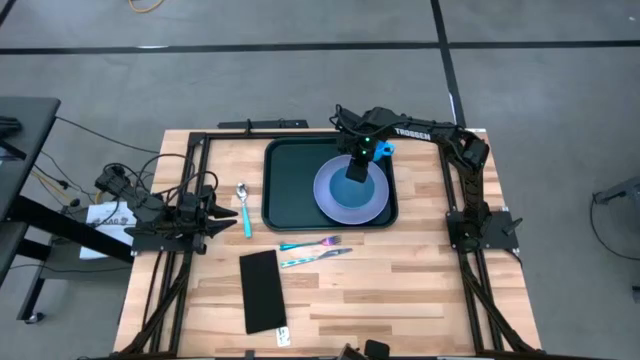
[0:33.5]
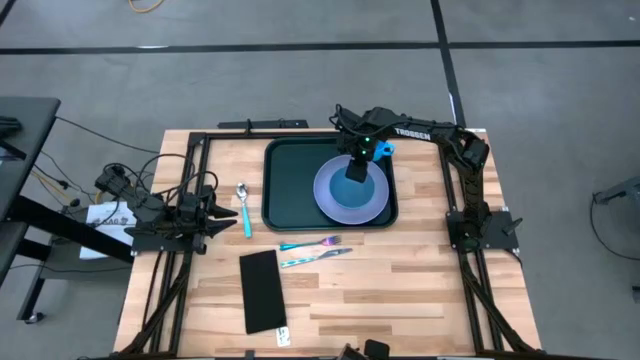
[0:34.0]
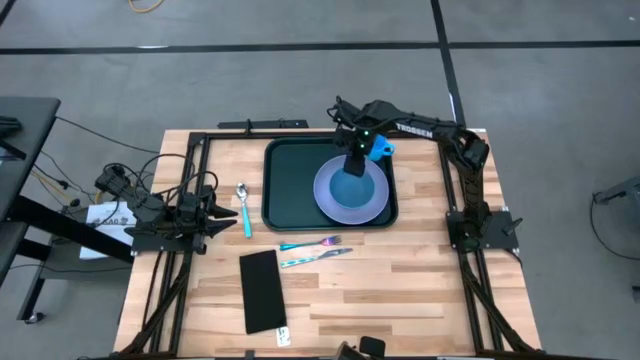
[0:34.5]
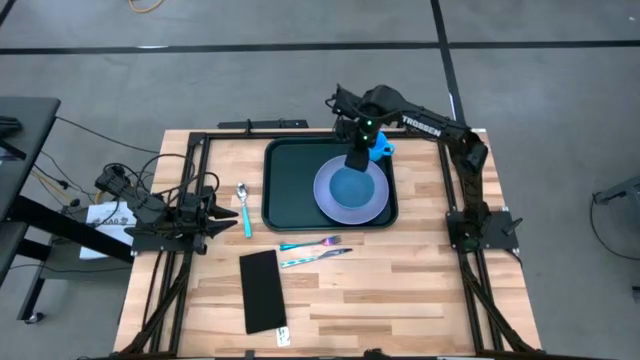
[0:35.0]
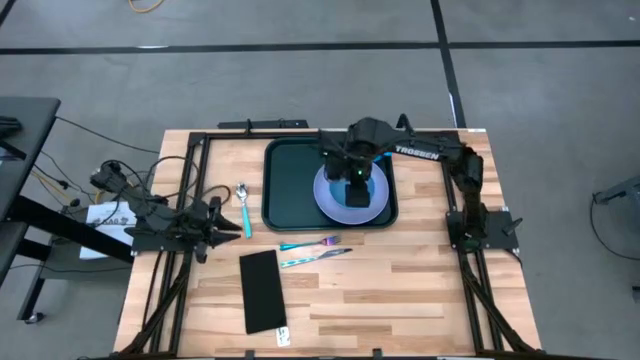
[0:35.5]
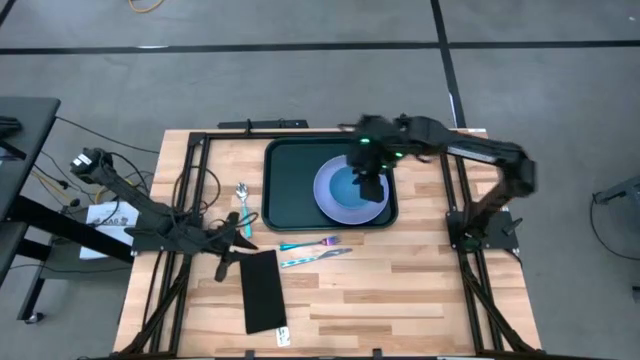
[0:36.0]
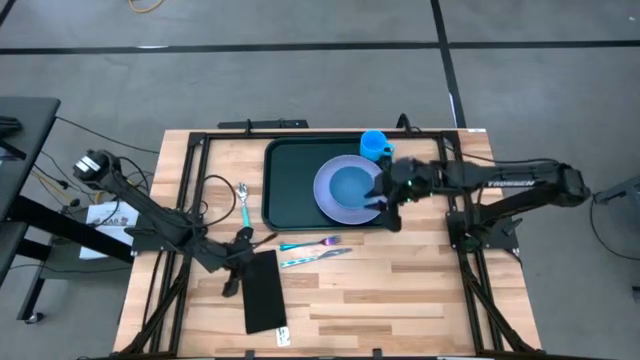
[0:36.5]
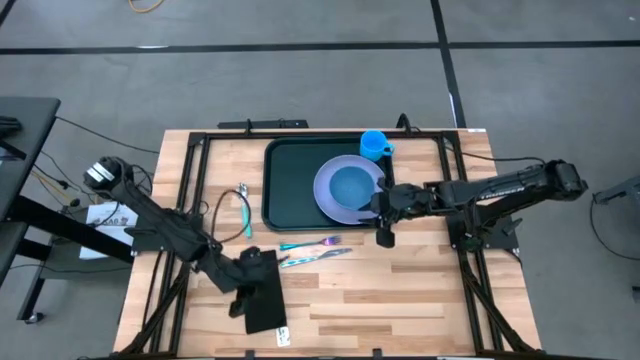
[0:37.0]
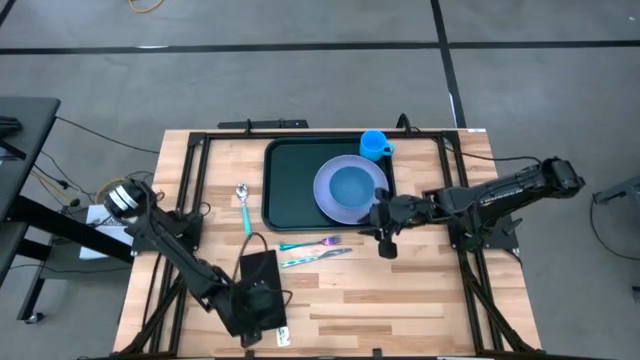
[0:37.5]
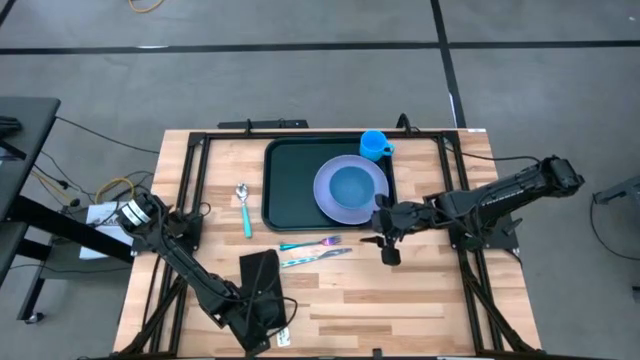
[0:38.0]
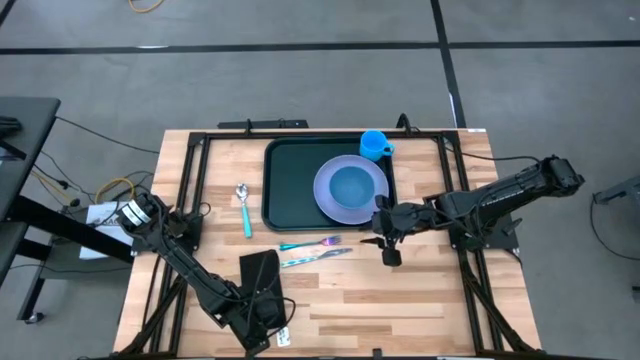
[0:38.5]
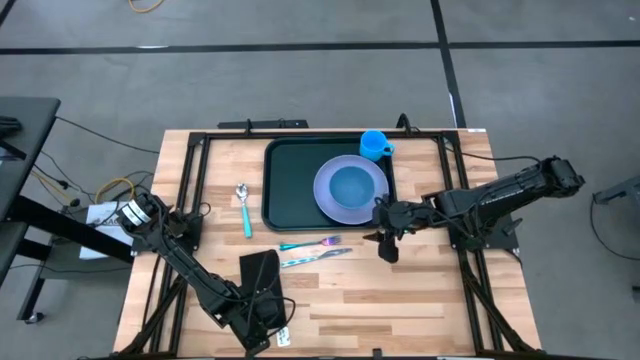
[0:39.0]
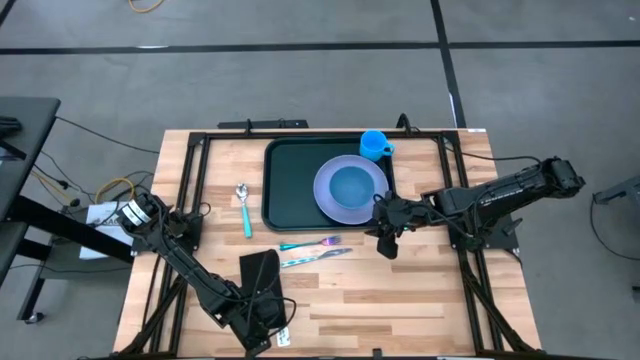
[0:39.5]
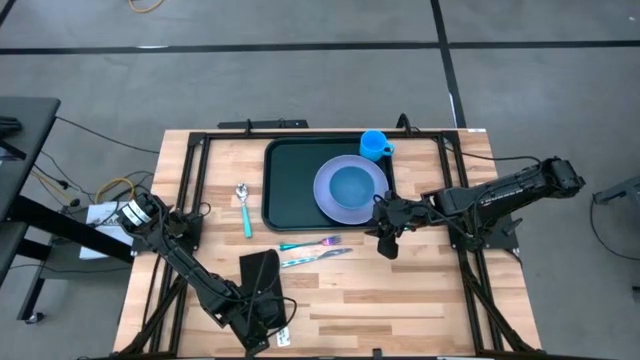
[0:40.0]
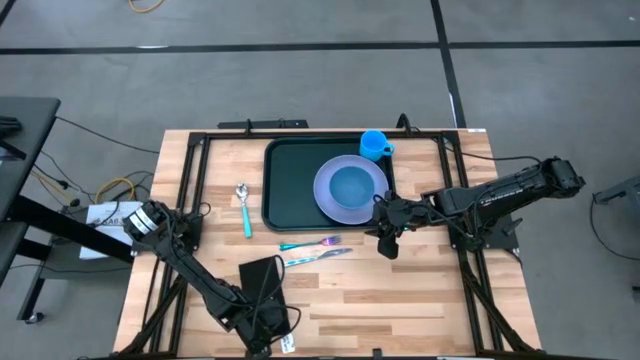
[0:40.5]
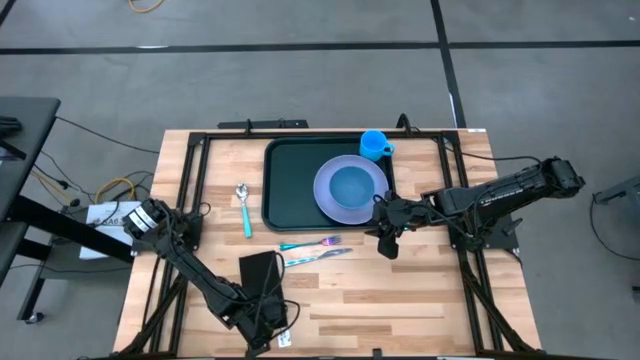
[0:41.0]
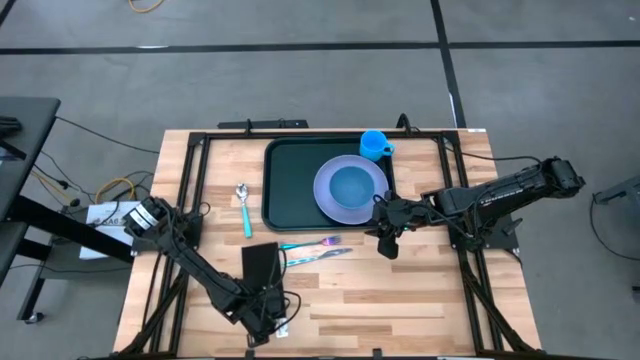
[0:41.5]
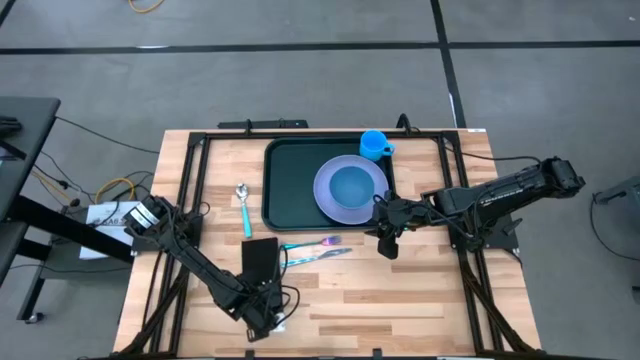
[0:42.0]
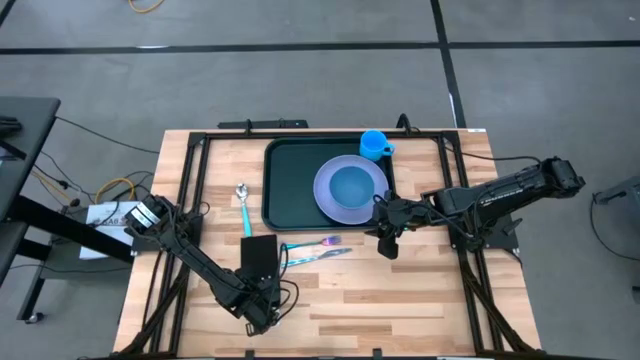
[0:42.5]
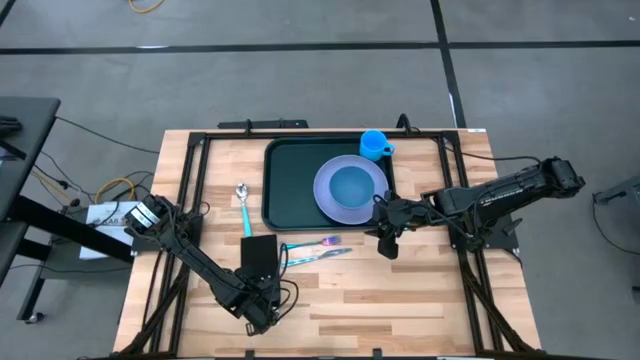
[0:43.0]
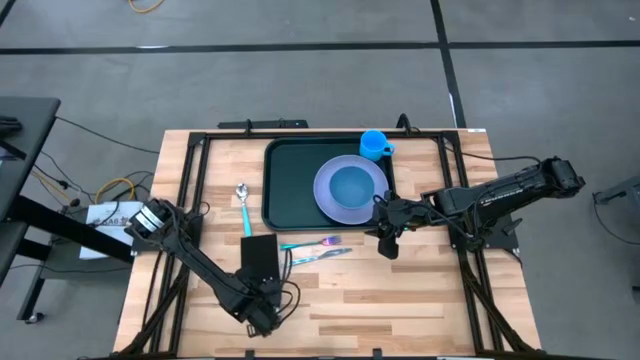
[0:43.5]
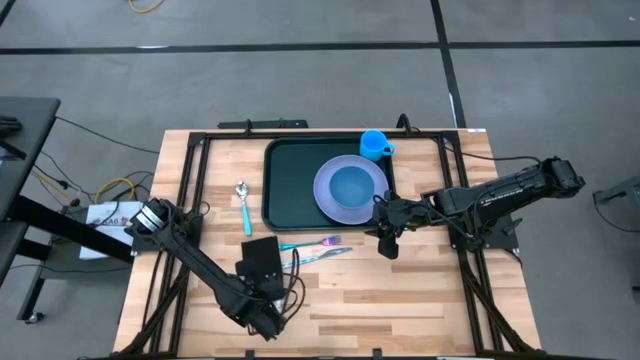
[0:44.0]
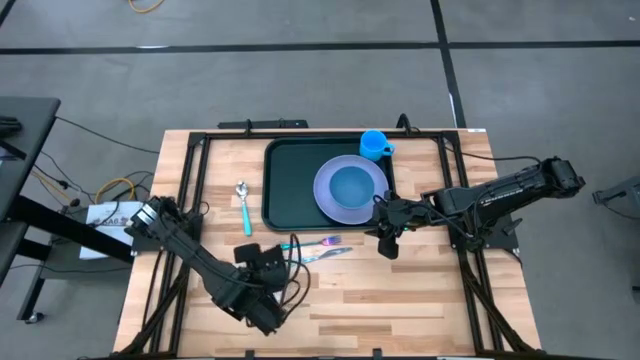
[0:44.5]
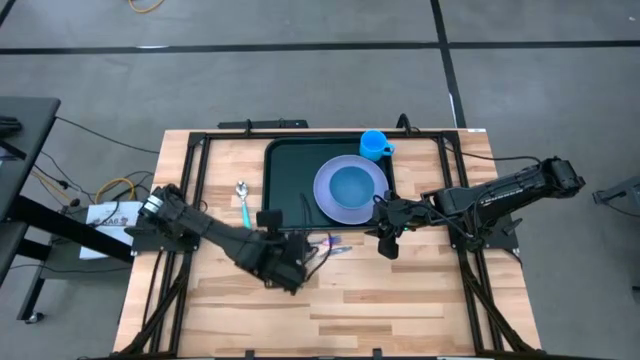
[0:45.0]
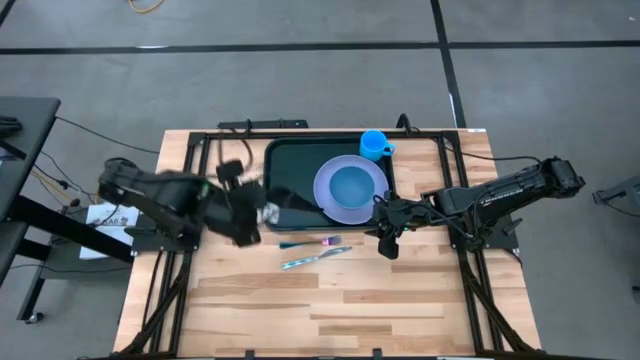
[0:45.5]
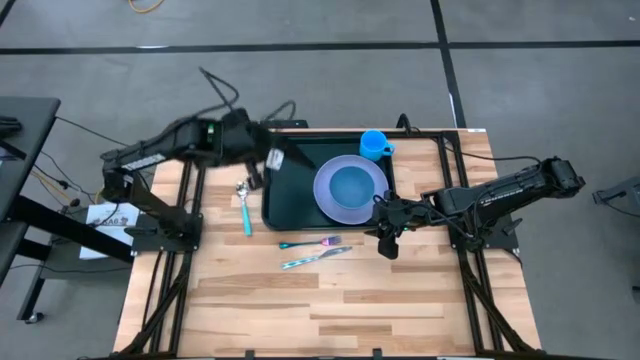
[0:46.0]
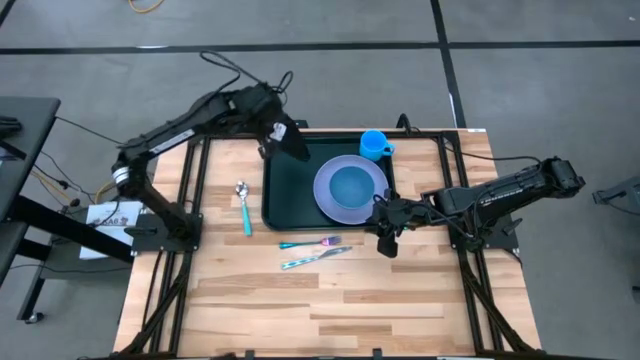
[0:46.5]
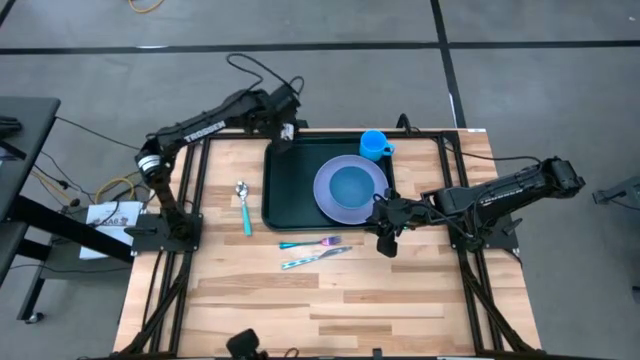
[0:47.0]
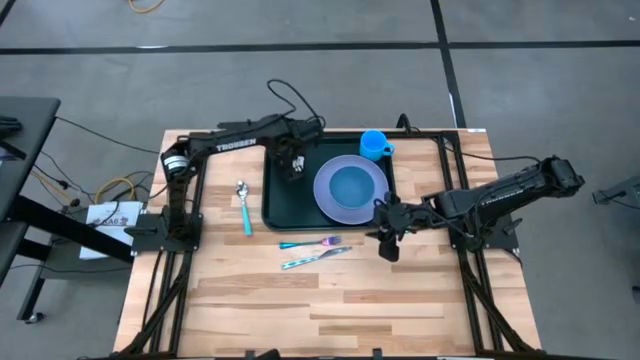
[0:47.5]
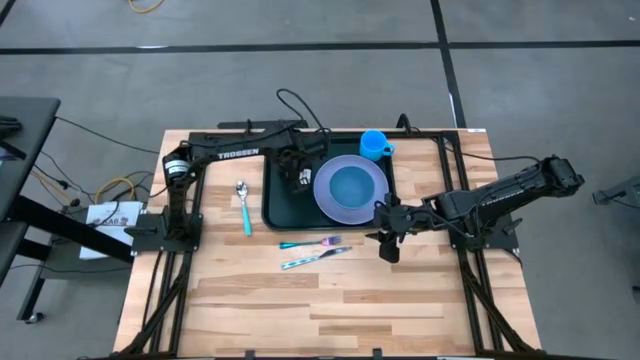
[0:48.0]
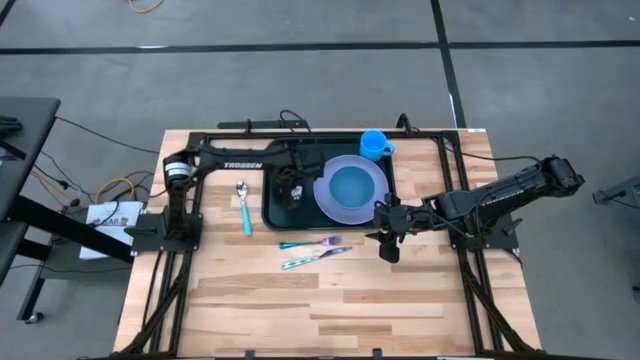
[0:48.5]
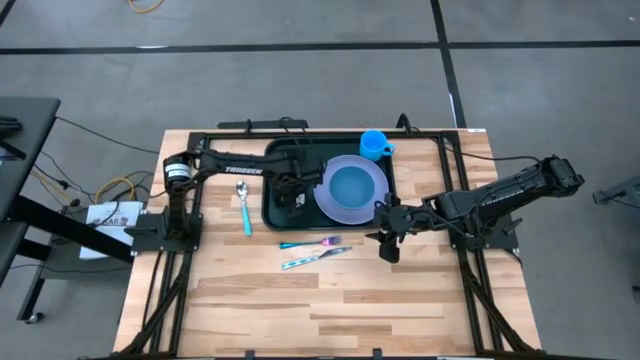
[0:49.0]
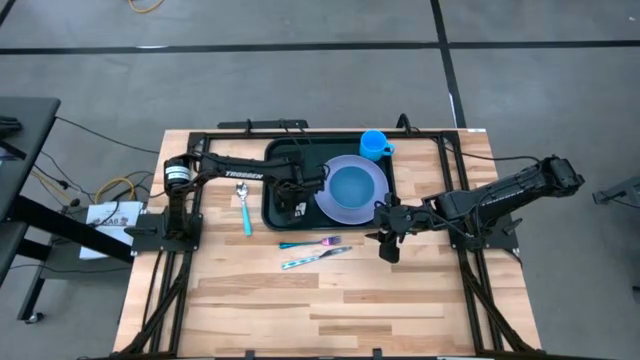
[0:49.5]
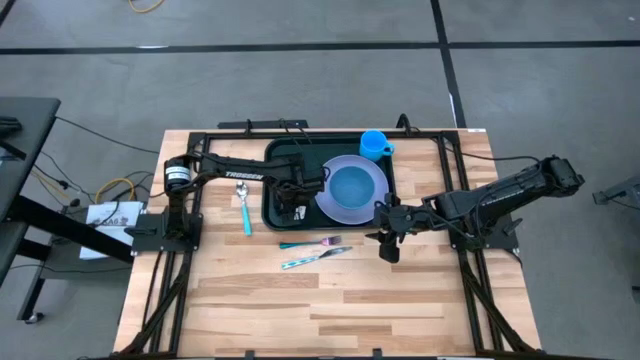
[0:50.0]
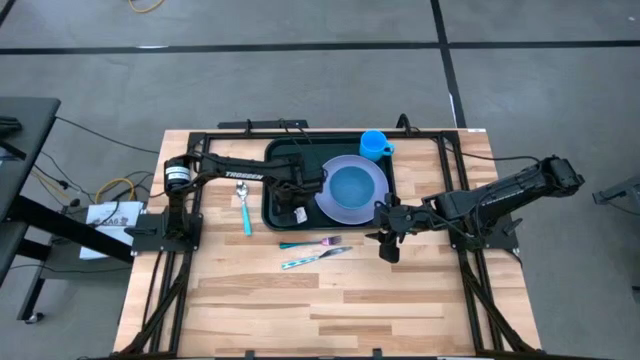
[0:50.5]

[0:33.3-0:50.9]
Task: Set up tray
Put the black napkin to the left of the purple plate on the black serving tray

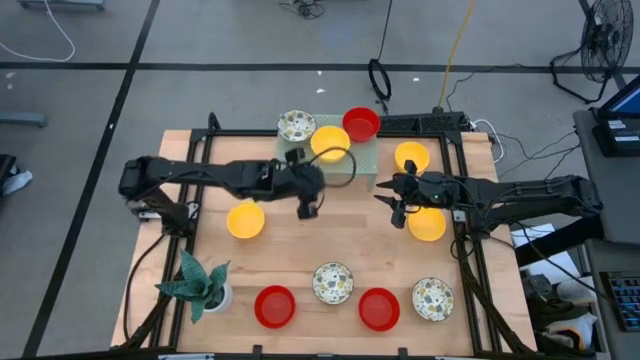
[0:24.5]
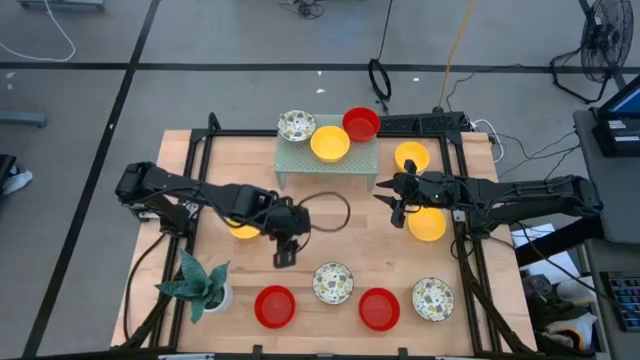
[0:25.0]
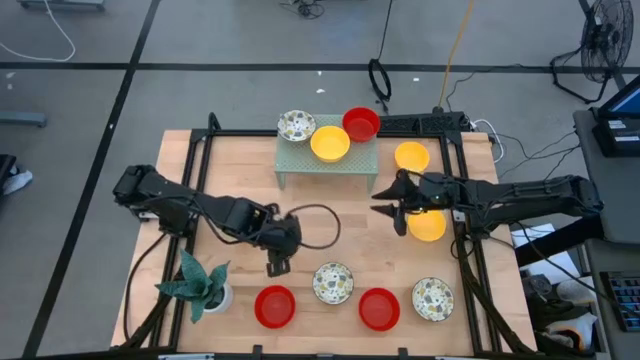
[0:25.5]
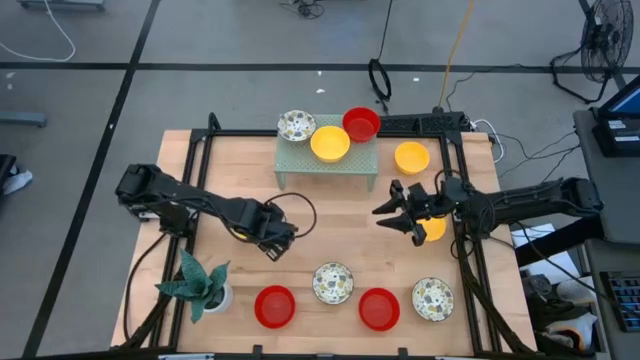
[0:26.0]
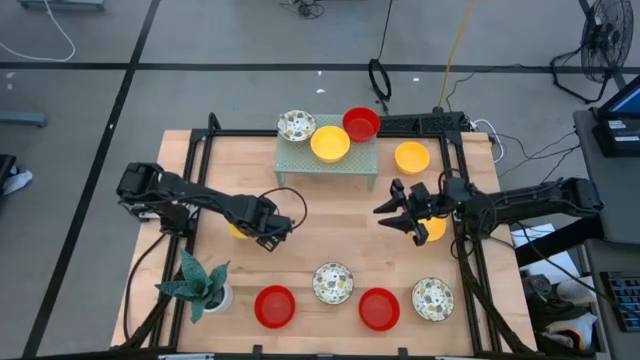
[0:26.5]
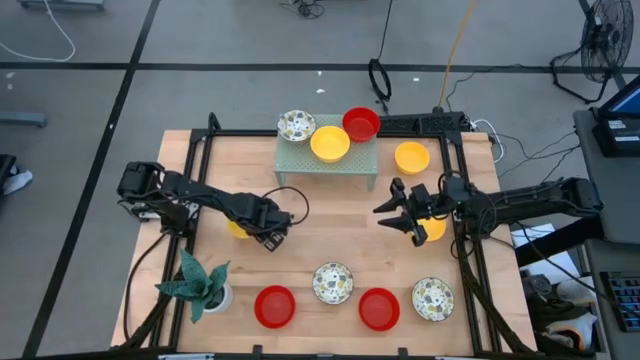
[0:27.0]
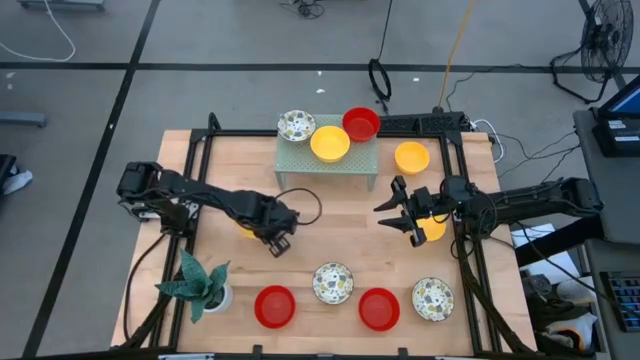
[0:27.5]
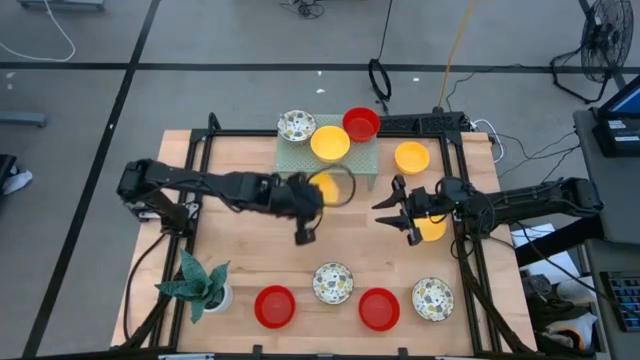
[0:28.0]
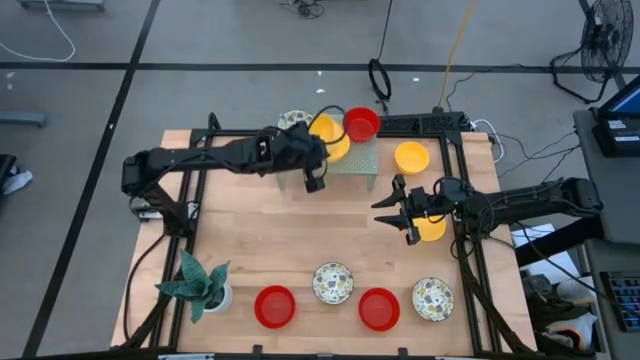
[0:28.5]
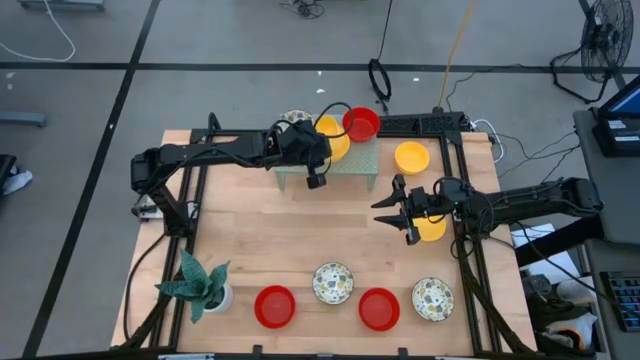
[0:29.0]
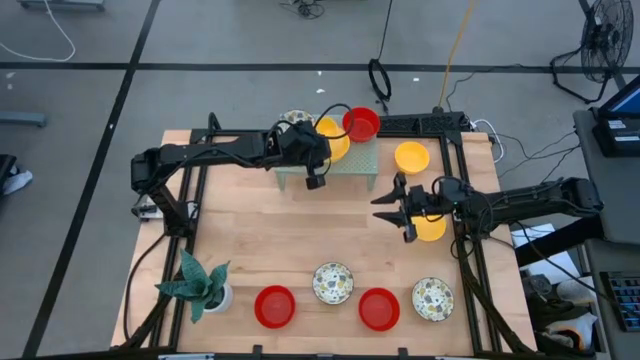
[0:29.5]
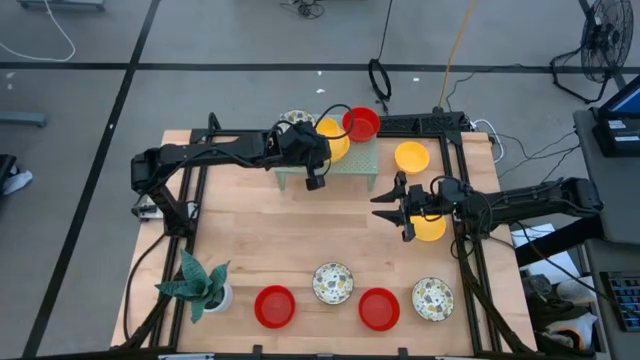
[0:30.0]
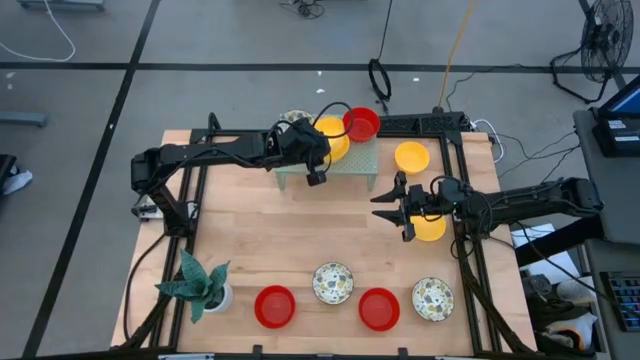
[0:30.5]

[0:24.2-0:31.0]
Task: Pick & Place Mini bowls
Stack the yellow bowl on top of the other yellow bowl on the shelf
